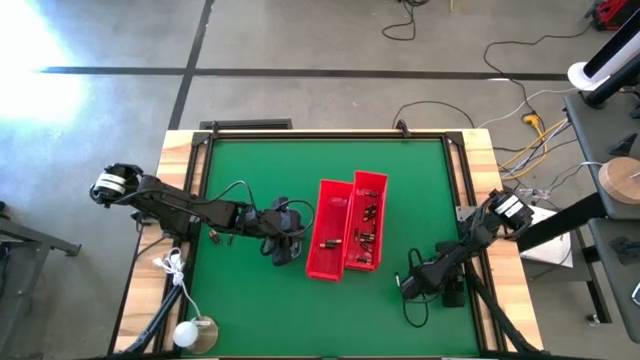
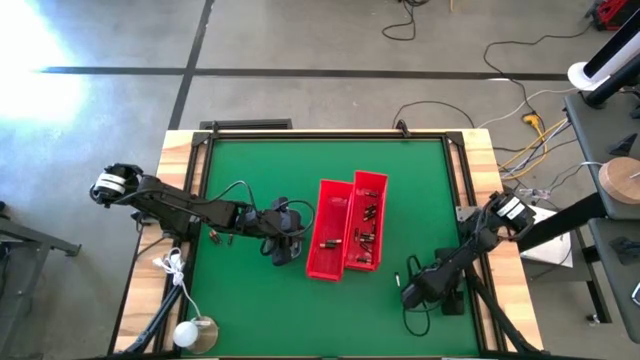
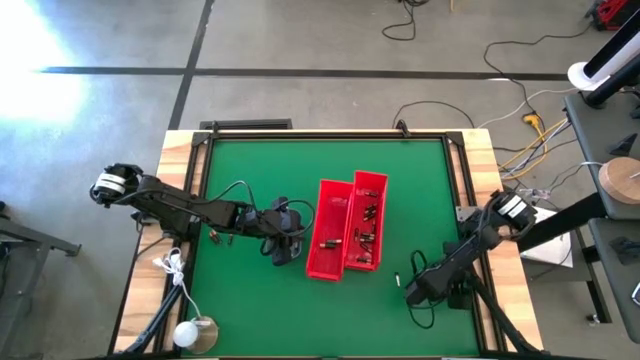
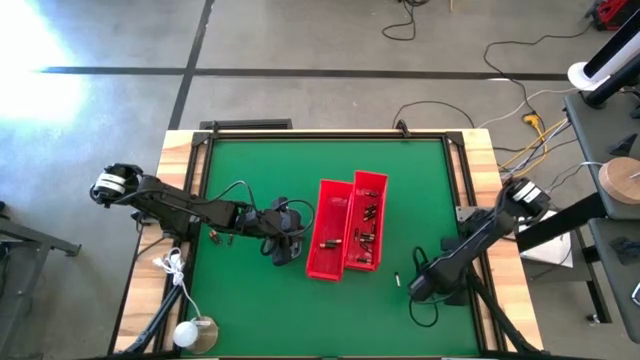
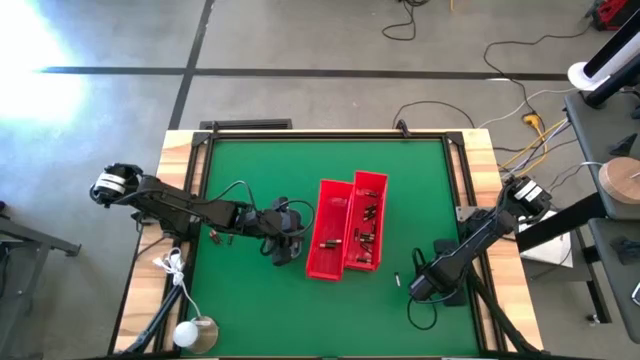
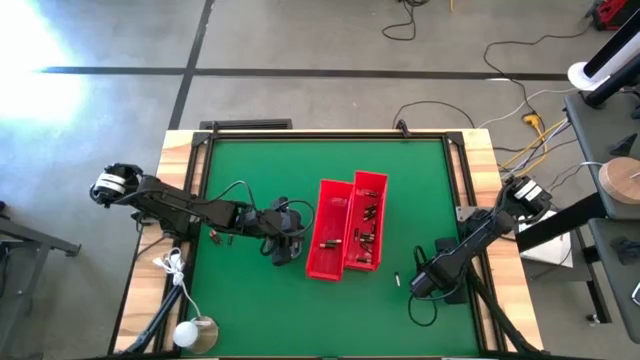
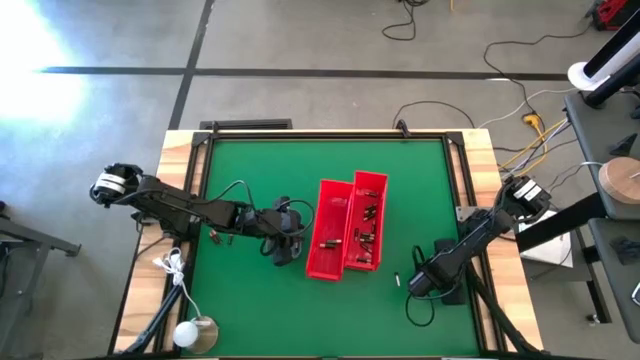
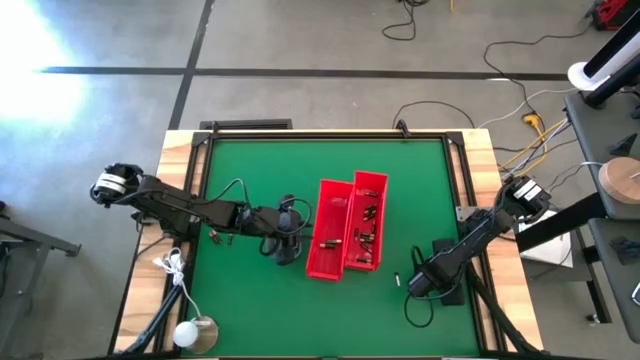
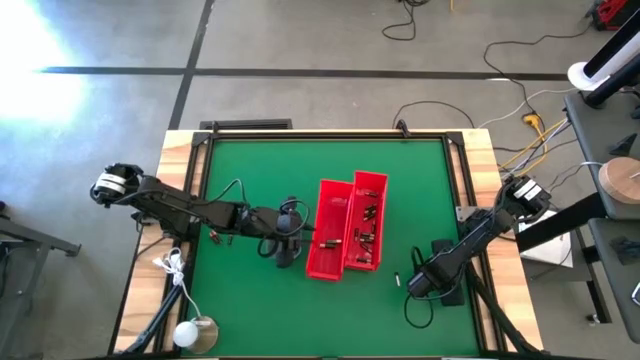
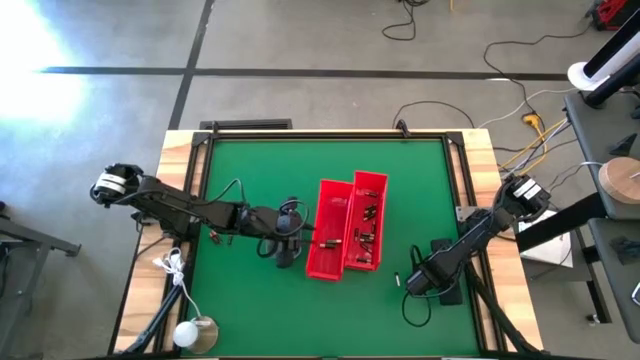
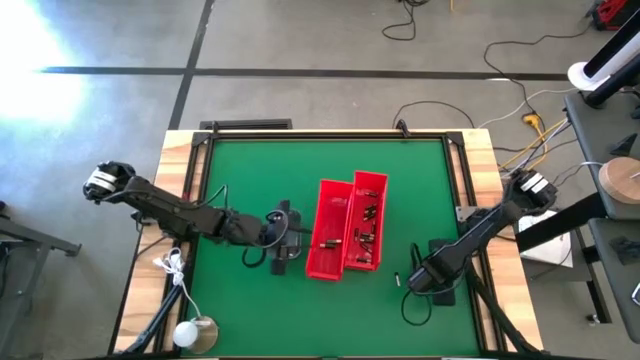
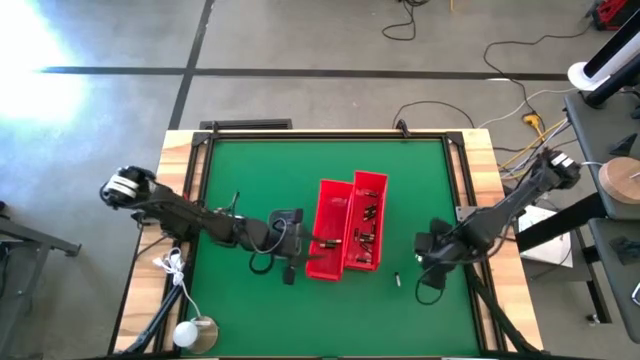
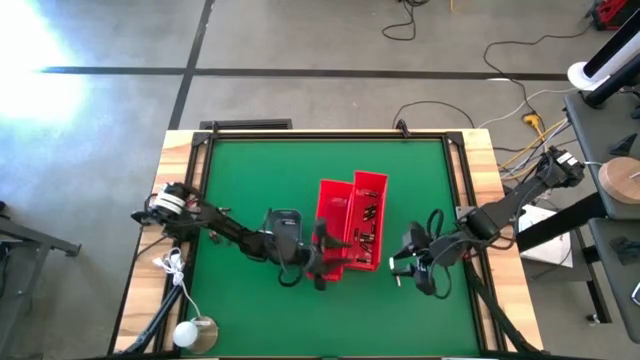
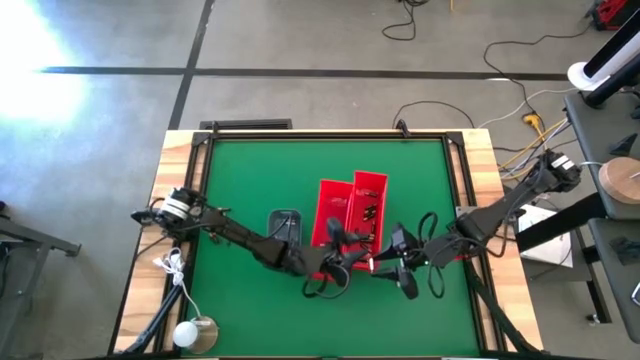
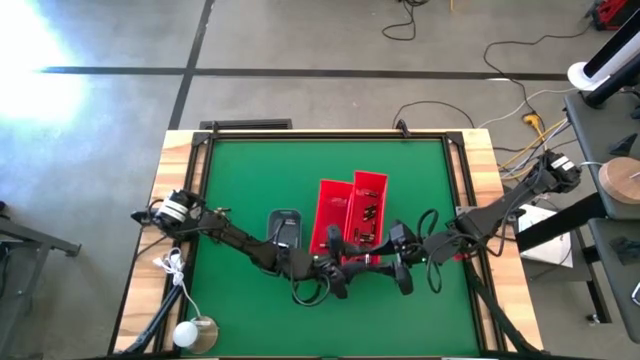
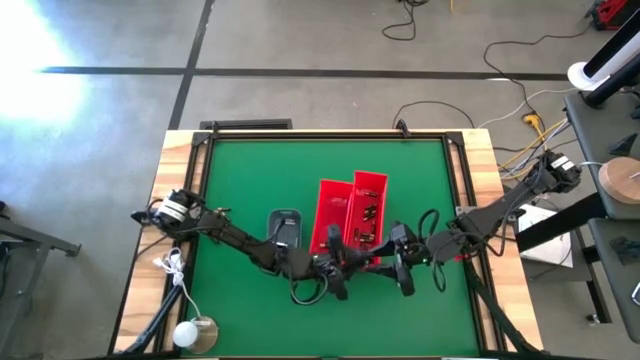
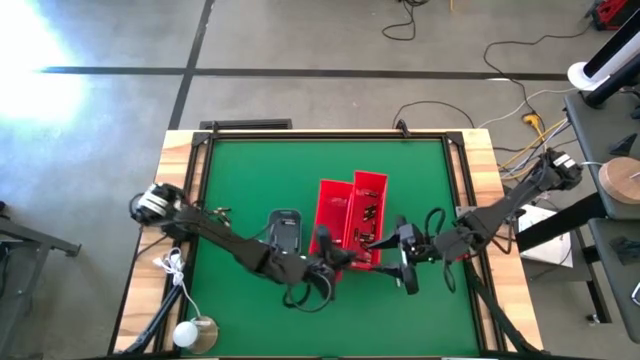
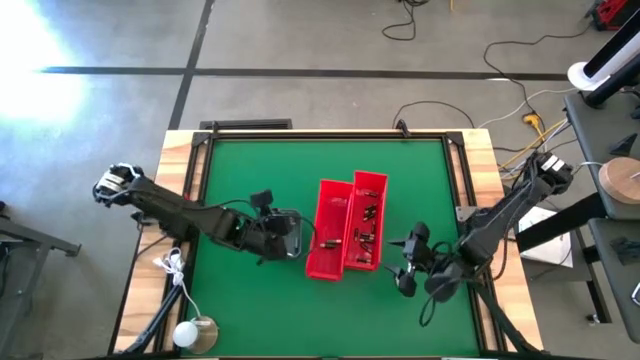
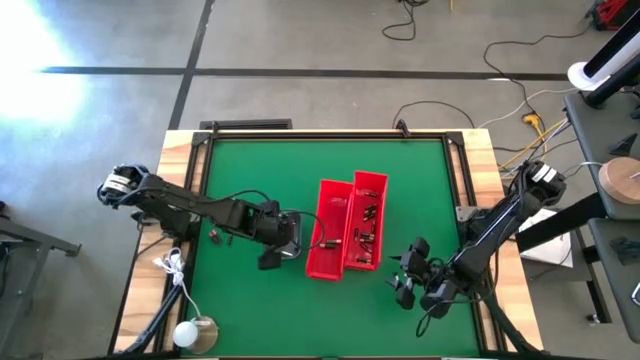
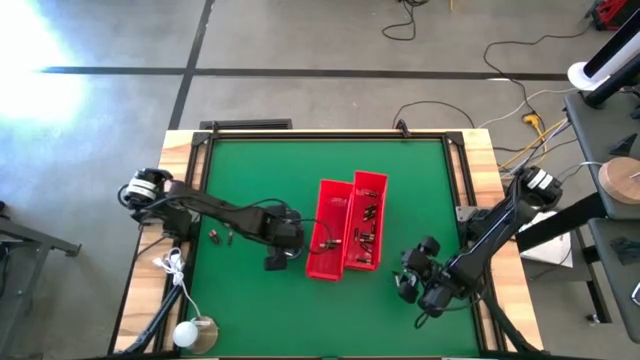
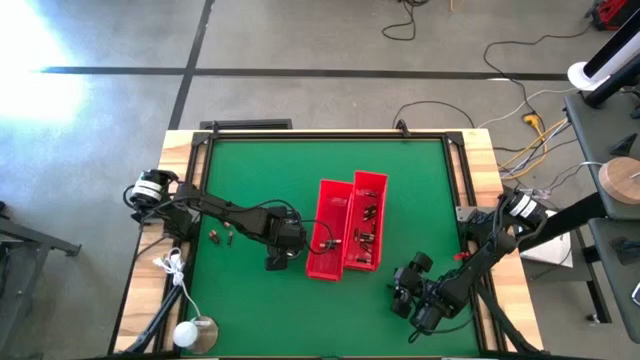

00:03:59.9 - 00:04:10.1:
Task: Sort batteries
Put the silver battery into the gray bin

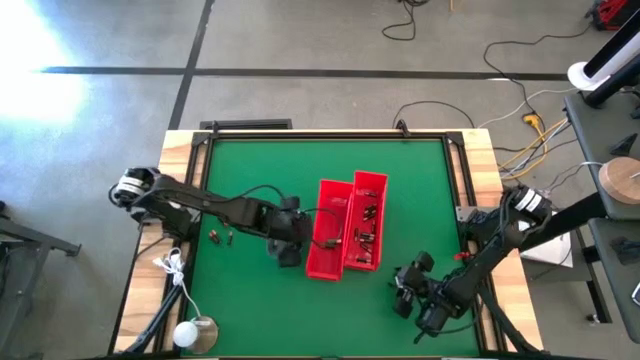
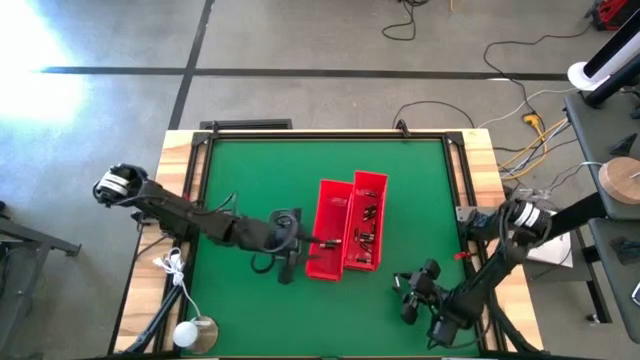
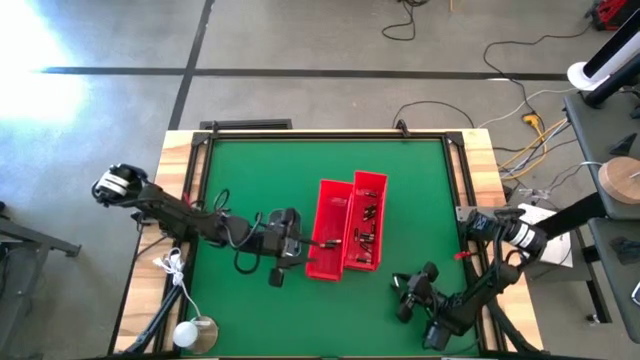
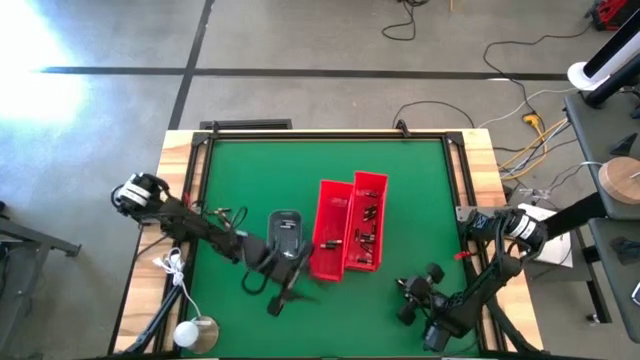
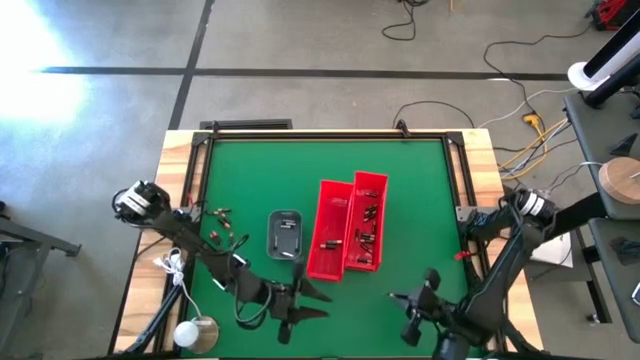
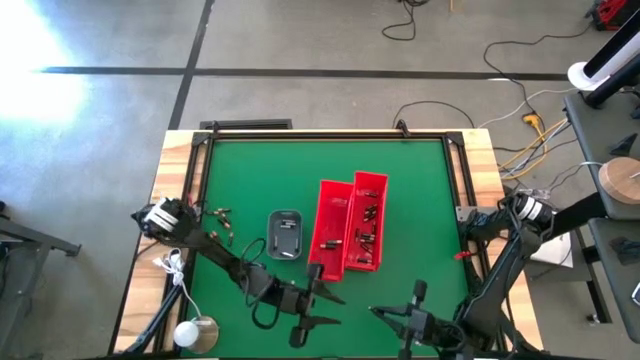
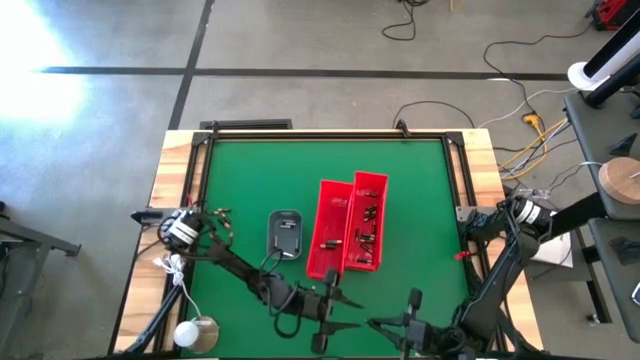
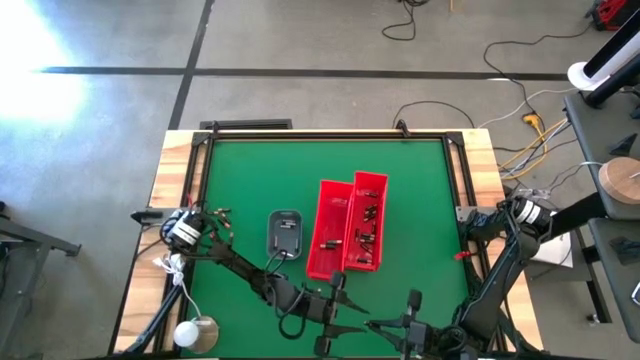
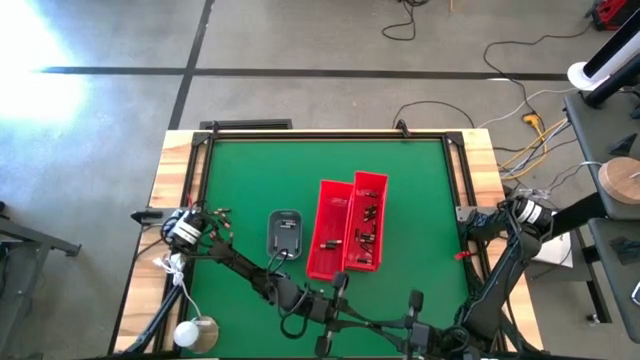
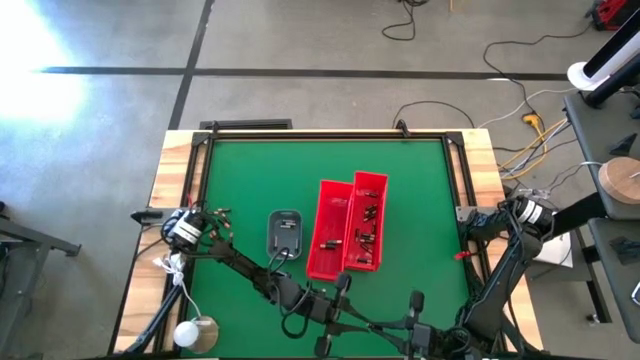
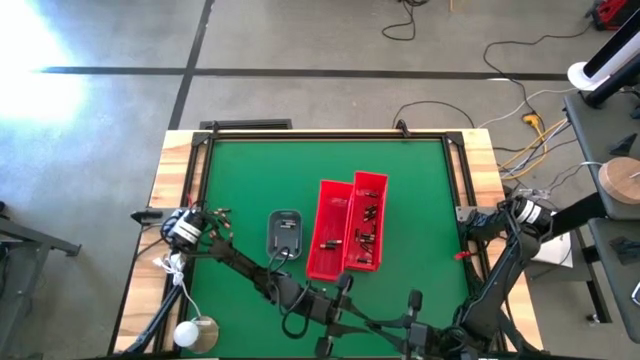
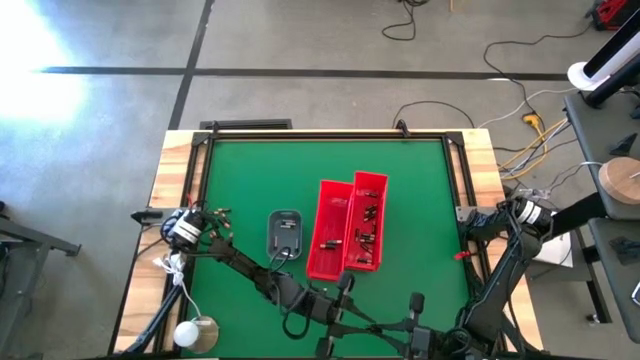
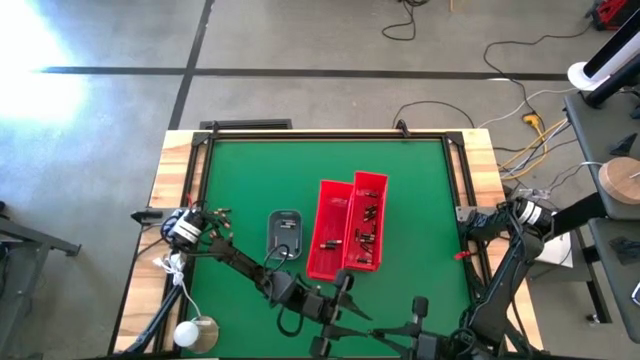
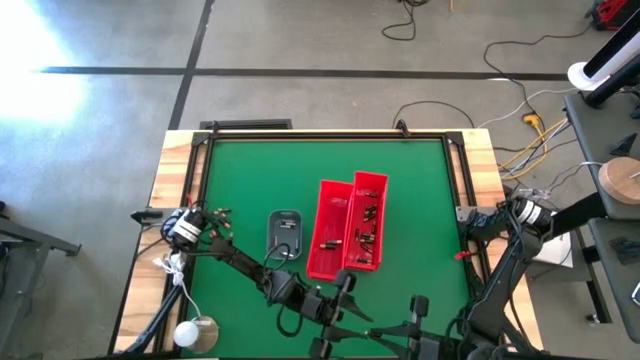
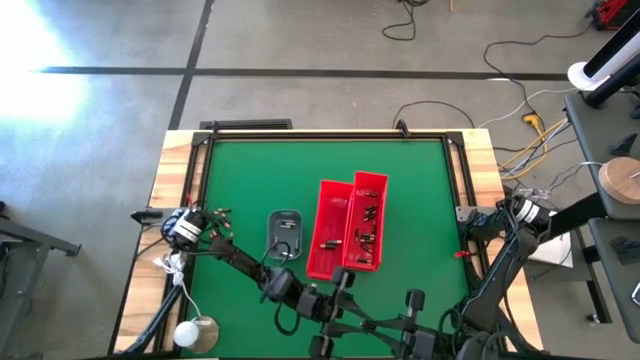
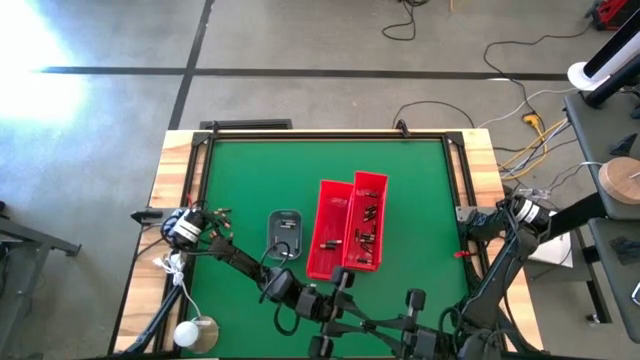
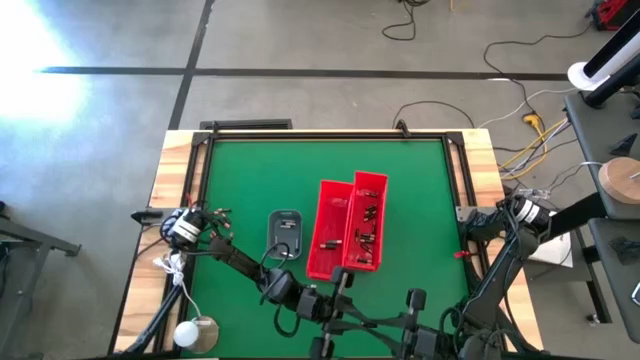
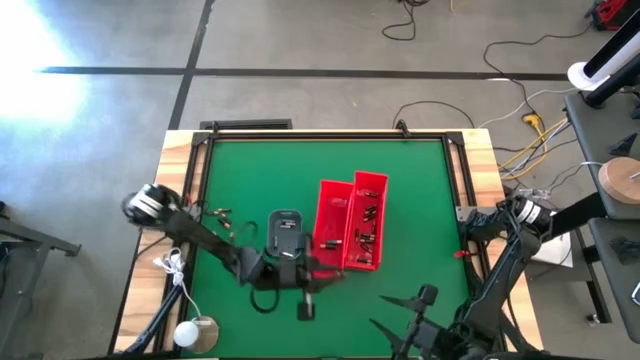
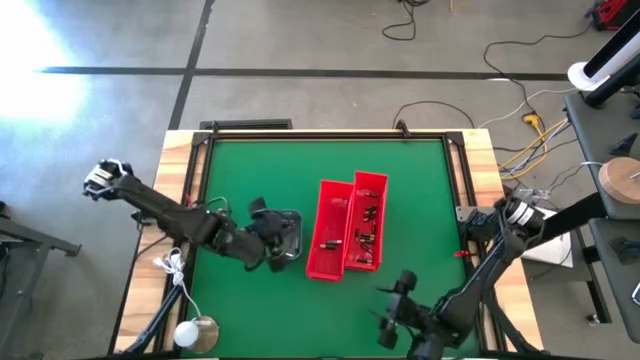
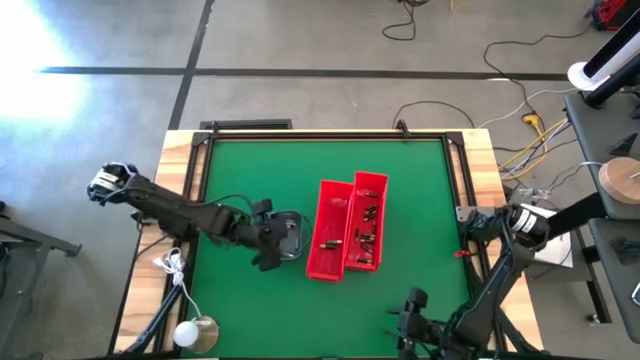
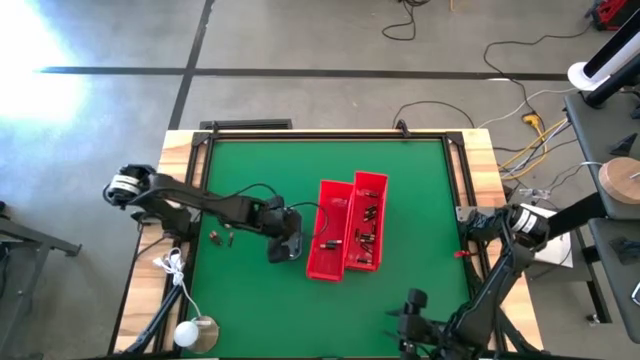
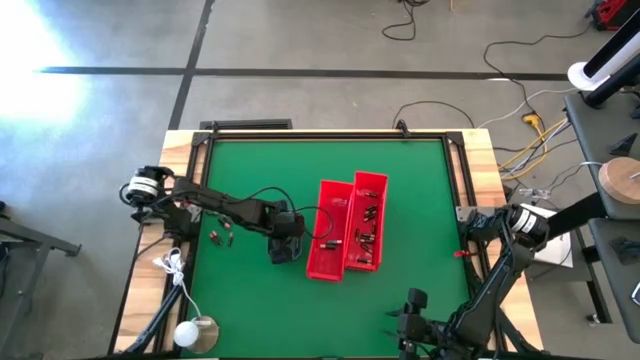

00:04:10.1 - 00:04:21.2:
Put the silver battery into the gray bin
